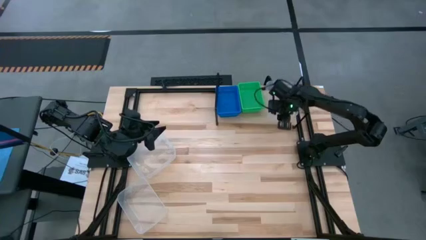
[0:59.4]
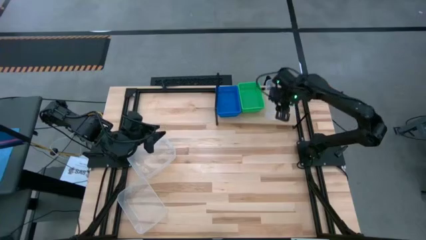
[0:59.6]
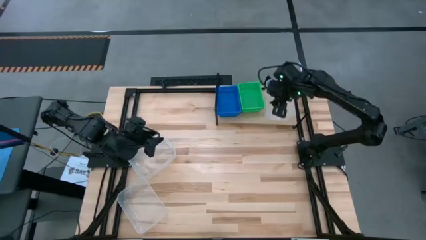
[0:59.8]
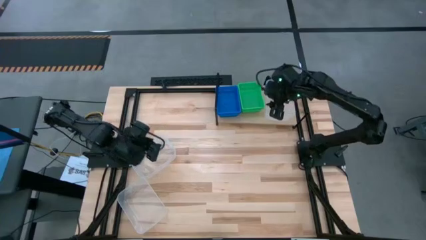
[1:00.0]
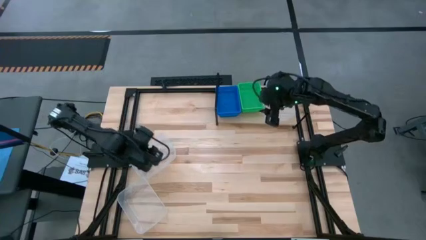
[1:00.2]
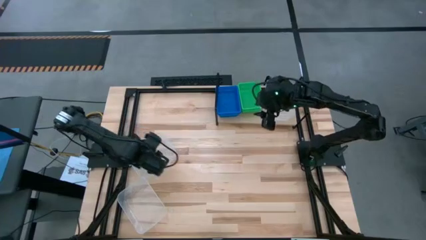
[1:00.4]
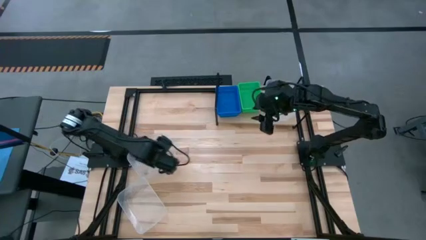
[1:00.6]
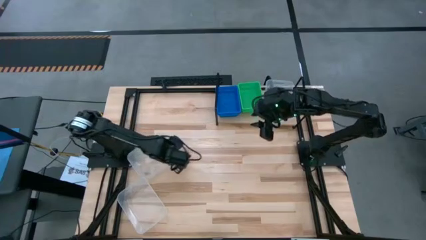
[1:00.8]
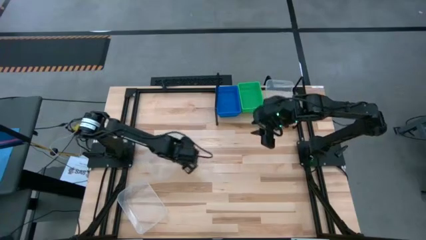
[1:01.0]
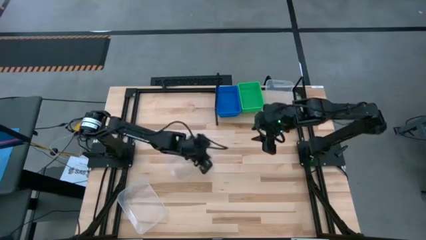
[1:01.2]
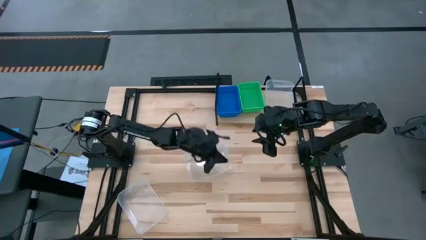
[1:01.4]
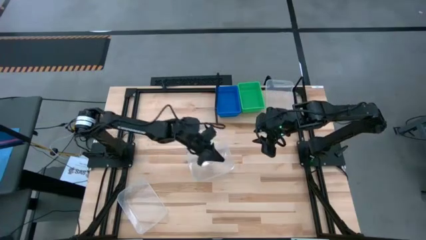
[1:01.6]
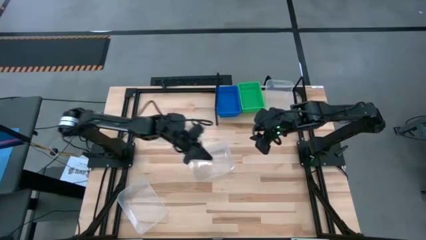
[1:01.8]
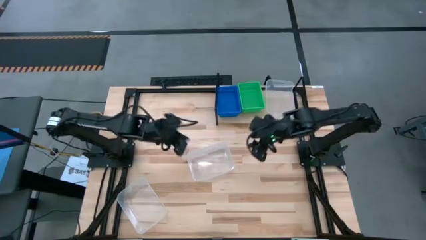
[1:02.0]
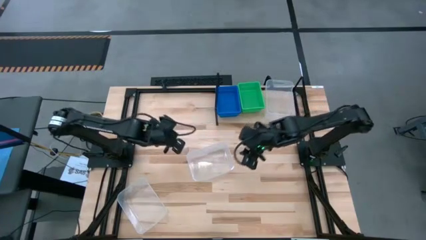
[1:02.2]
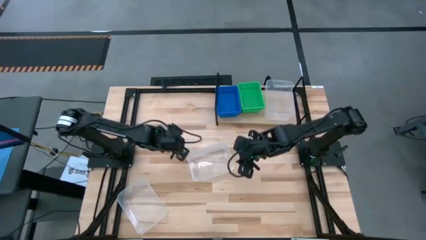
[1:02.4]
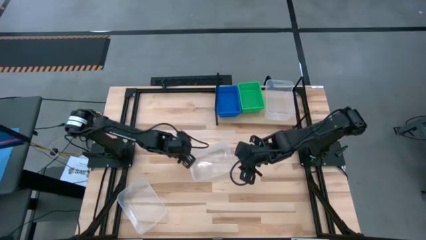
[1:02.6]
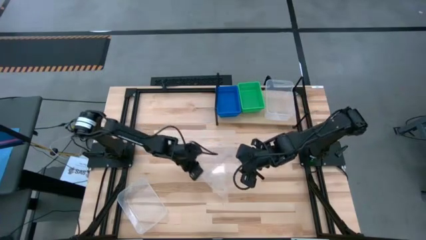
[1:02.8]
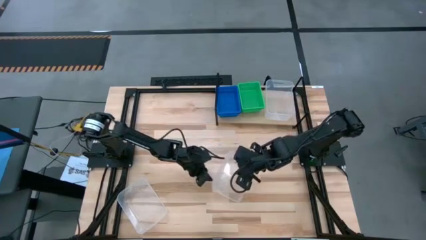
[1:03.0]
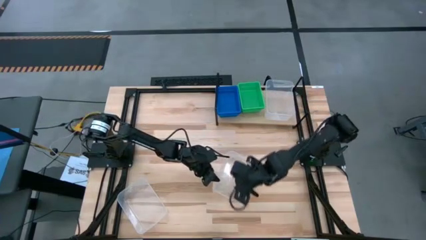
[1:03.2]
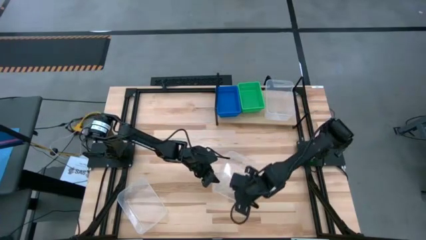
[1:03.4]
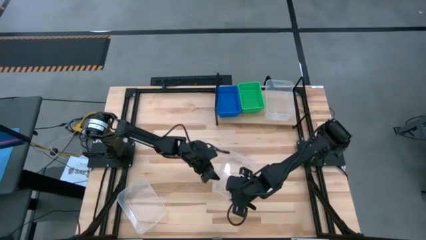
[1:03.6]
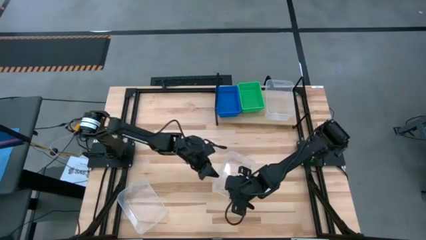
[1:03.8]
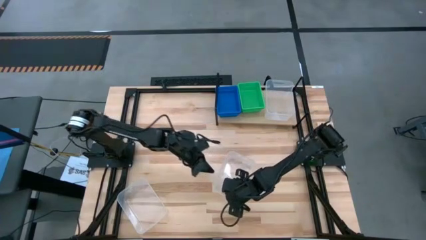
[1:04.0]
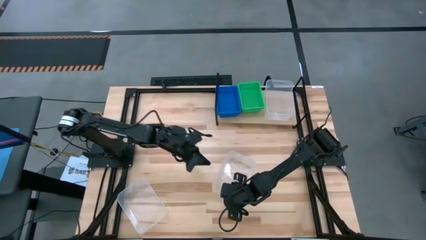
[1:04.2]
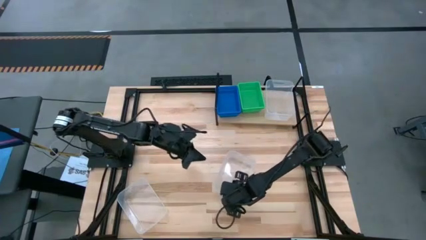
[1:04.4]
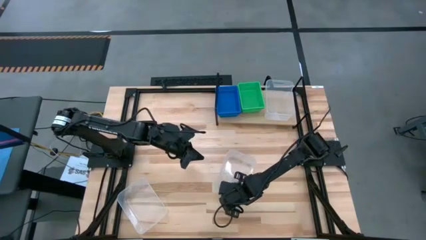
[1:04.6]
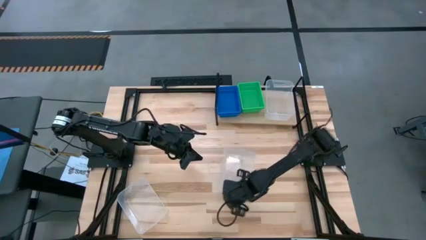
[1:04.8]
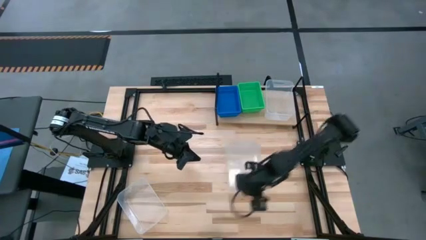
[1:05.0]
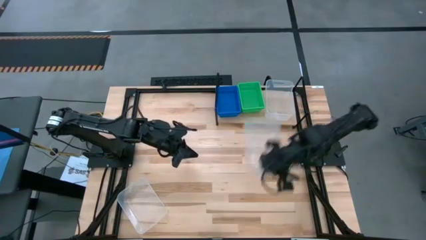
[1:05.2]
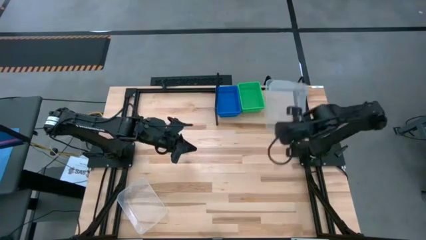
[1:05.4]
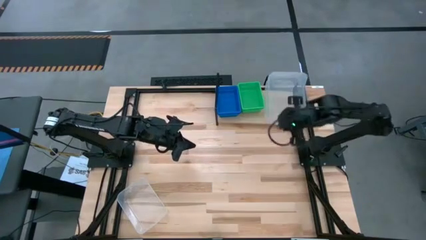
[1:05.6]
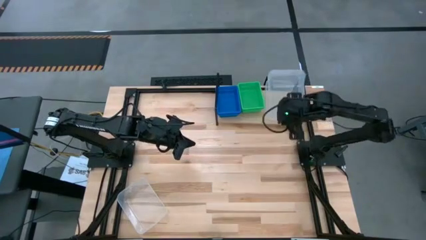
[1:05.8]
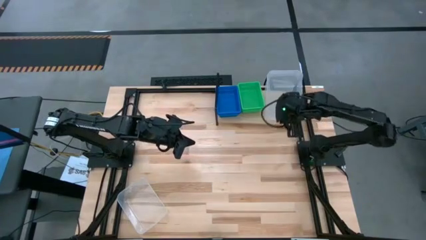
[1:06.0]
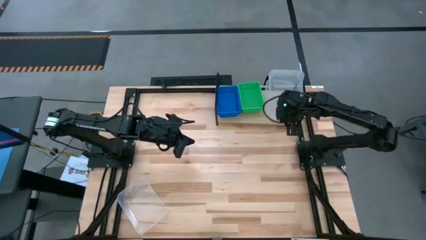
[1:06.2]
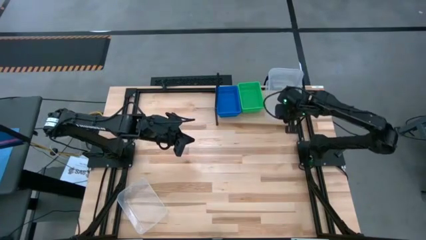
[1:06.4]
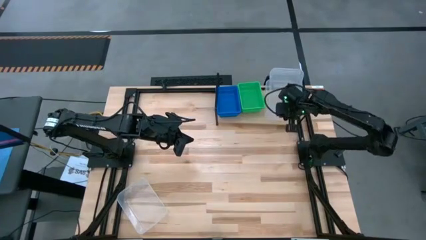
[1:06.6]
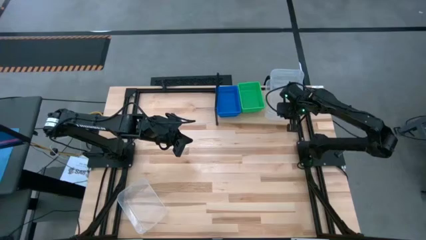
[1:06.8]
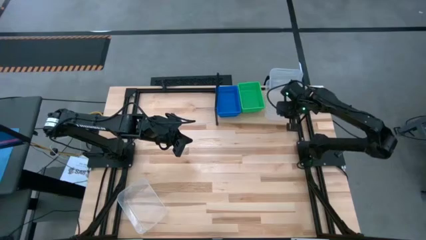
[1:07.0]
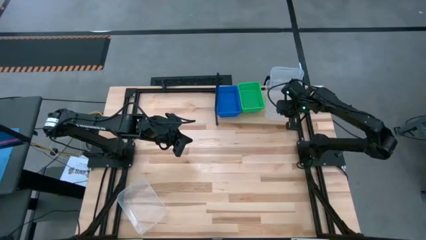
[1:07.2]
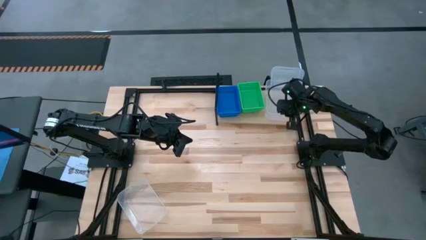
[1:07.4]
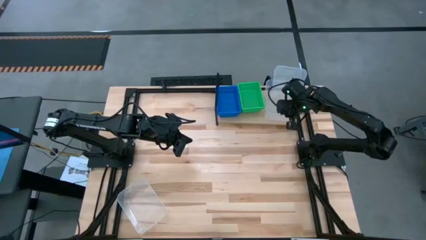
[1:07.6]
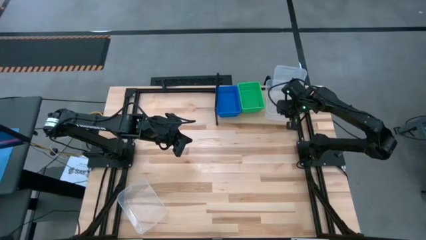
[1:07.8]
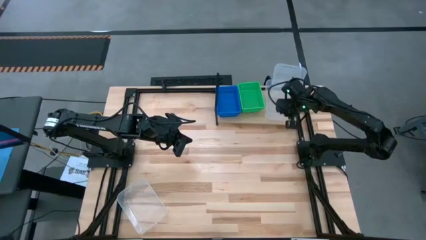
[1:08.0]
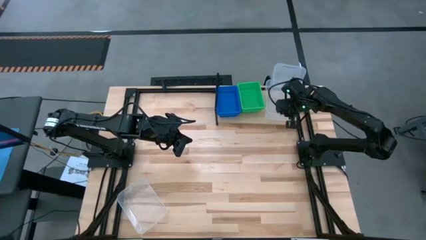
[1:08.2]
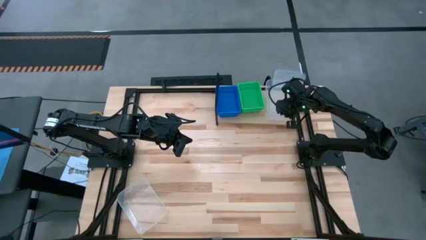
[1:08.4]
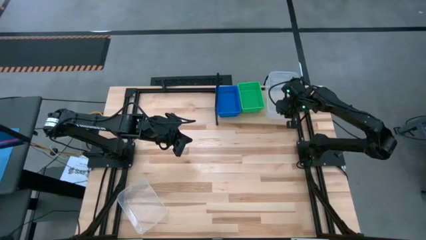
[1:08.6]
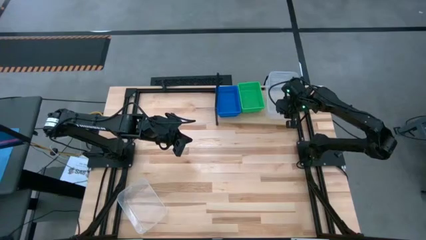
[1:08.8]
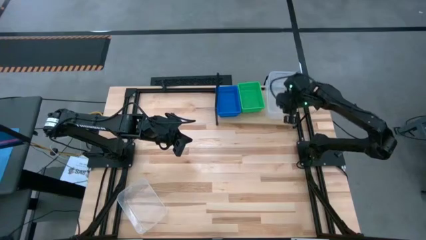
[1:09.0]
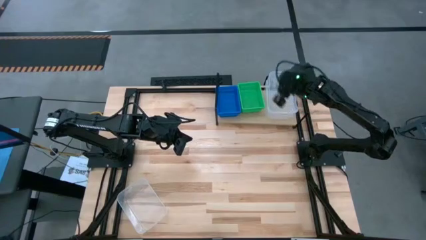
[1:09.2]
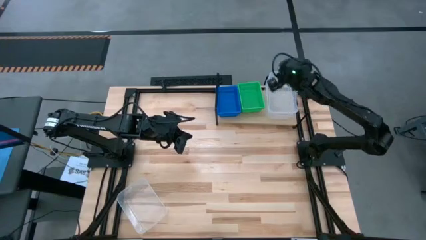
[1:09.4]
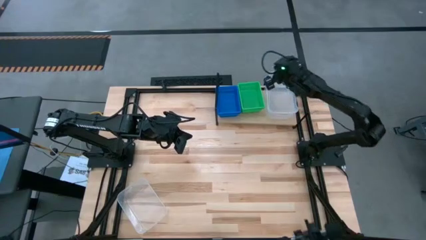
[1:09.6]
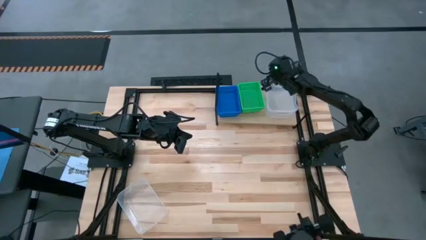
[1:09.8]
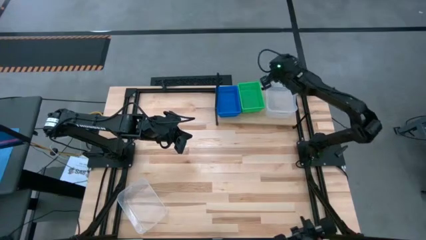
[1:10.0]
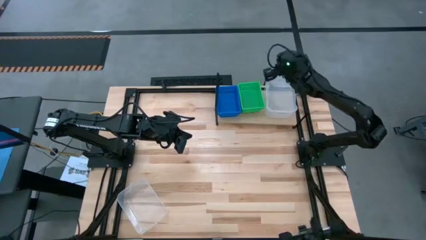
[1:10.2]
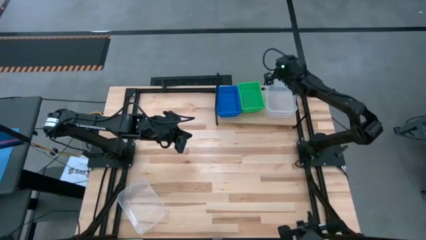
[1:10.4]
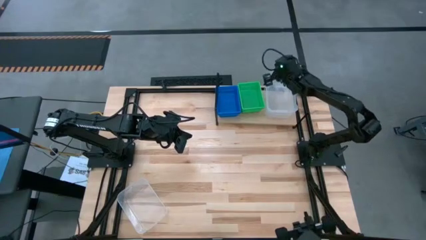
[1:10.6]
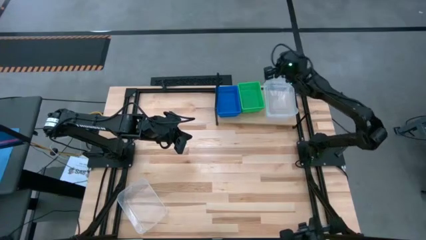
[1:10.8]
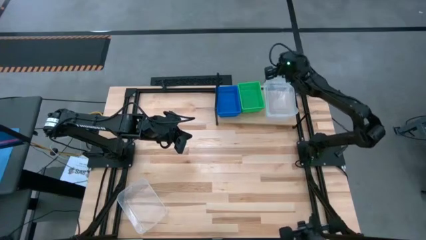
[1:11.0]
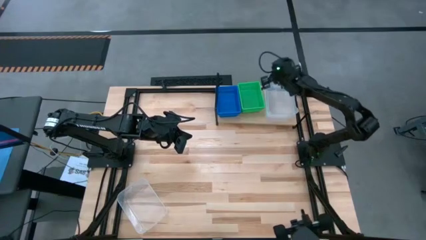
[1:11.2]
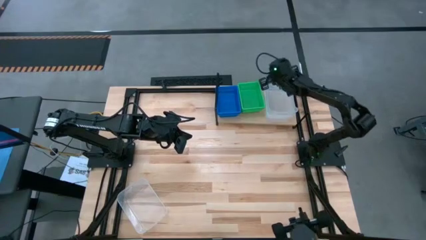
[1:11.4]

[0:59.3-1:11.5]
Task: Stack baskets on shelf by color
Stack the top transparent bin on top of the transparent bin on the shelf
